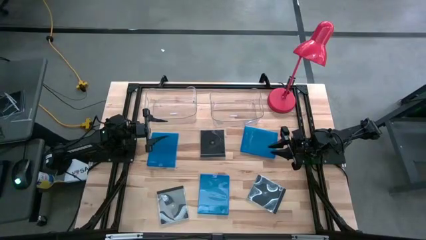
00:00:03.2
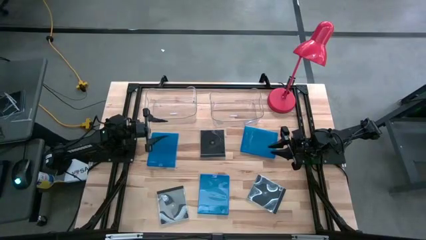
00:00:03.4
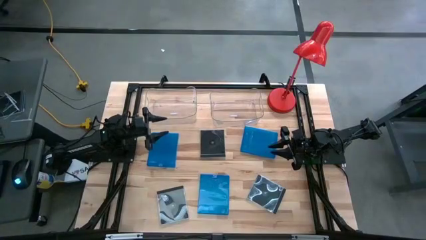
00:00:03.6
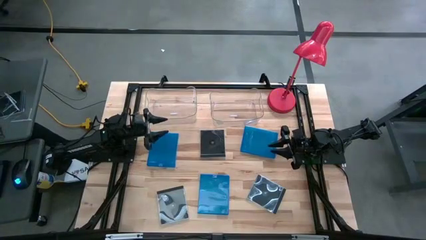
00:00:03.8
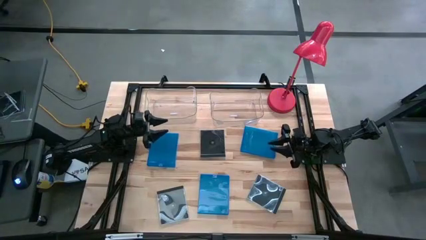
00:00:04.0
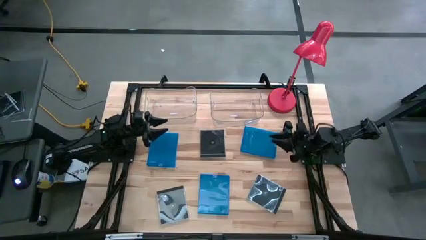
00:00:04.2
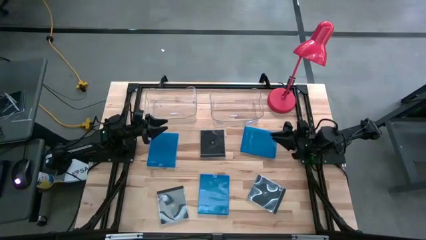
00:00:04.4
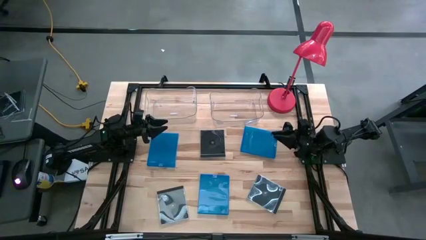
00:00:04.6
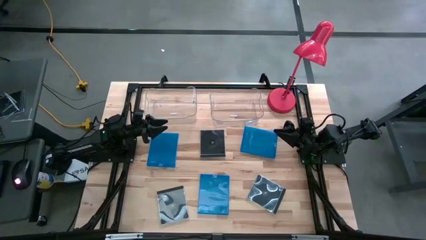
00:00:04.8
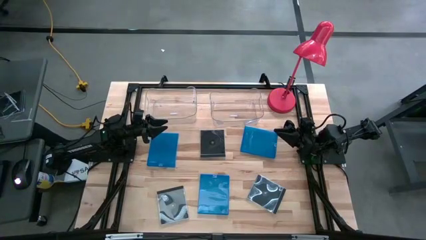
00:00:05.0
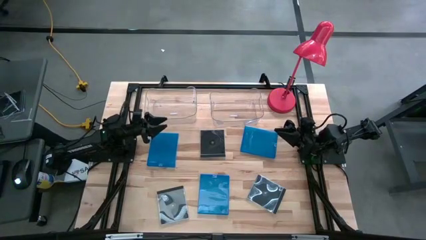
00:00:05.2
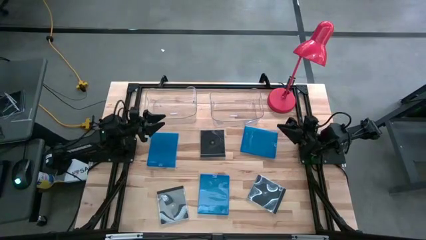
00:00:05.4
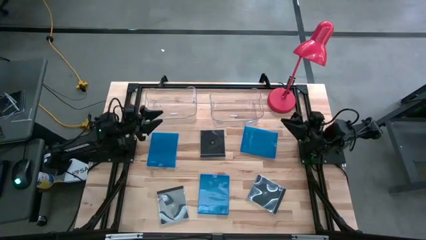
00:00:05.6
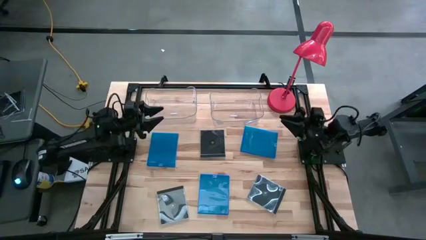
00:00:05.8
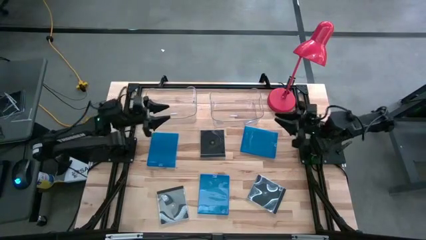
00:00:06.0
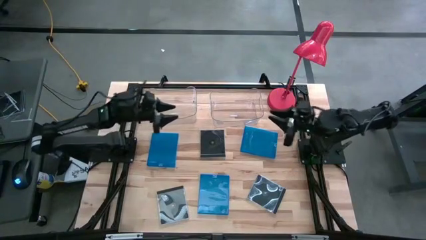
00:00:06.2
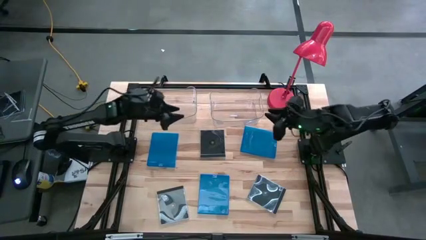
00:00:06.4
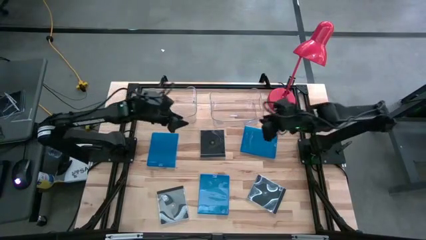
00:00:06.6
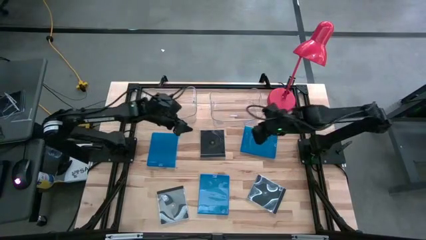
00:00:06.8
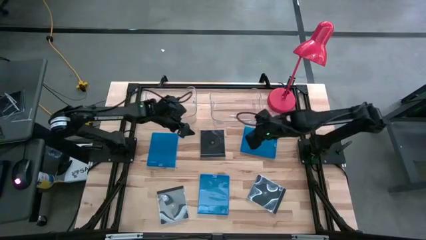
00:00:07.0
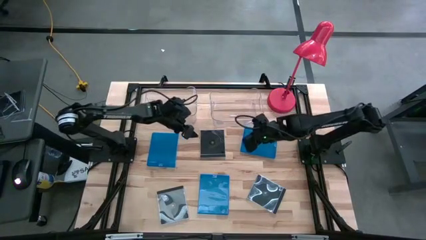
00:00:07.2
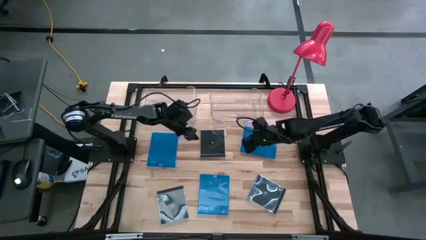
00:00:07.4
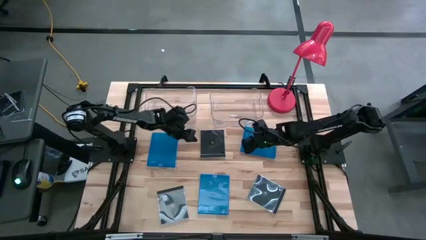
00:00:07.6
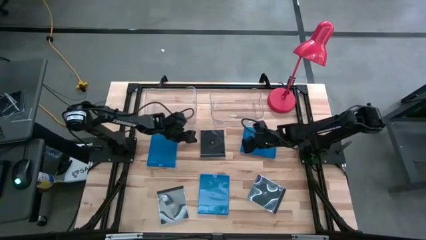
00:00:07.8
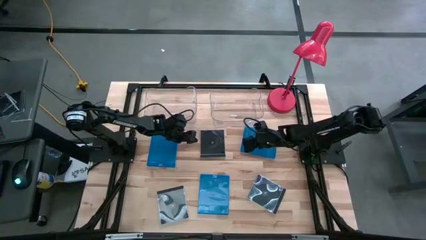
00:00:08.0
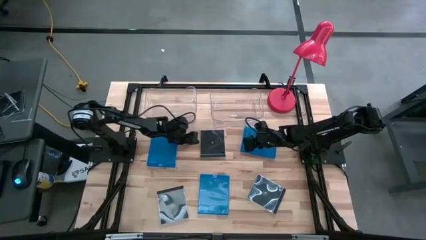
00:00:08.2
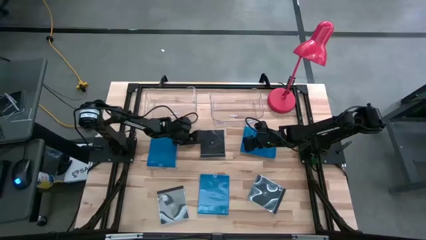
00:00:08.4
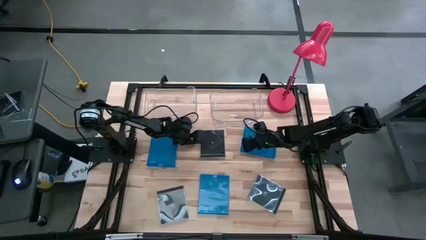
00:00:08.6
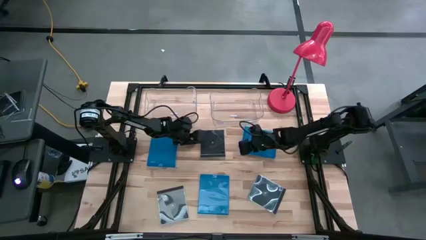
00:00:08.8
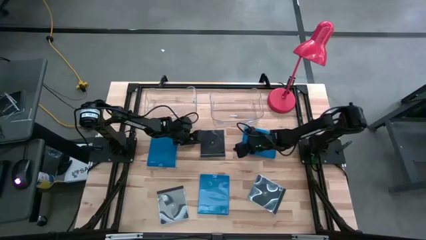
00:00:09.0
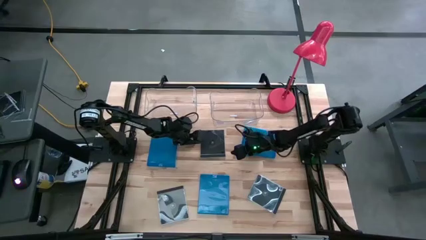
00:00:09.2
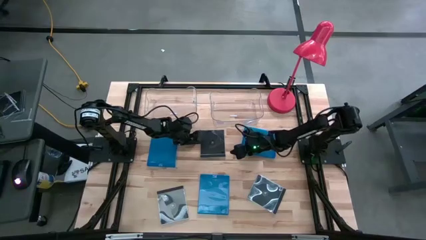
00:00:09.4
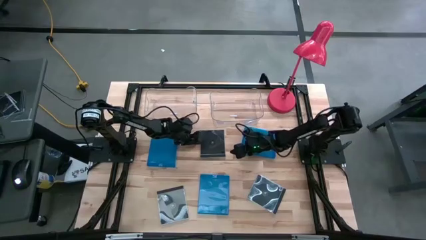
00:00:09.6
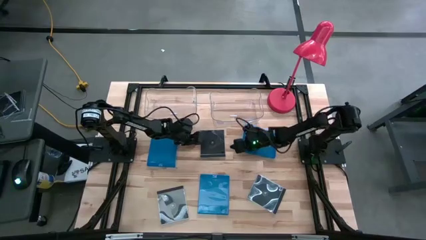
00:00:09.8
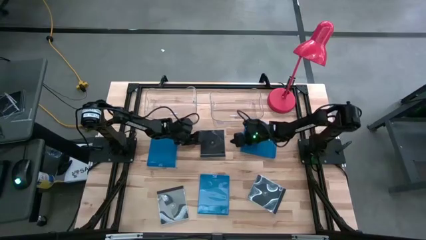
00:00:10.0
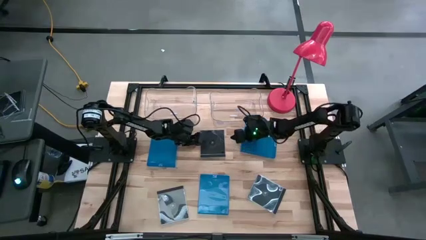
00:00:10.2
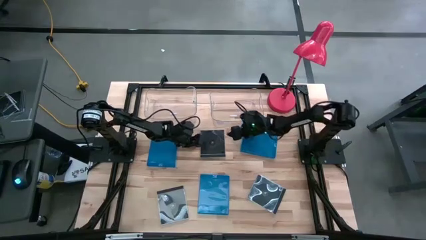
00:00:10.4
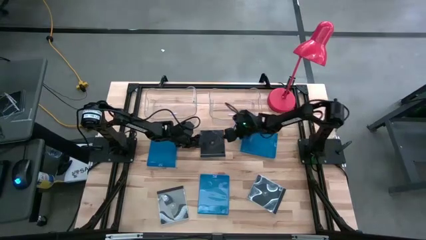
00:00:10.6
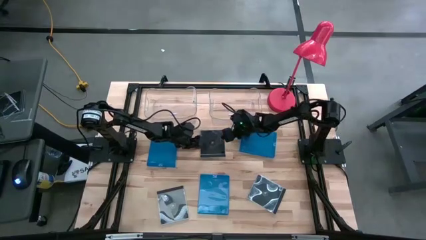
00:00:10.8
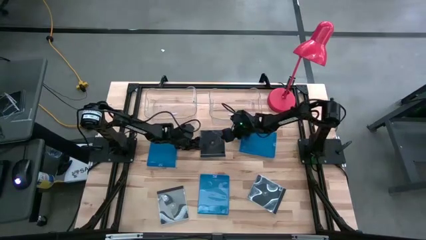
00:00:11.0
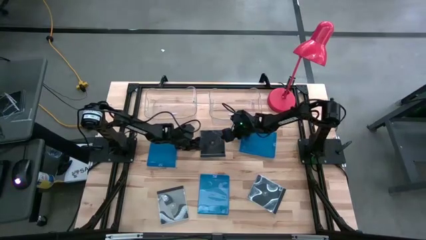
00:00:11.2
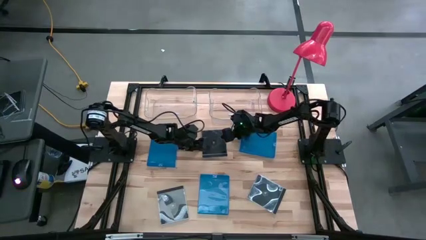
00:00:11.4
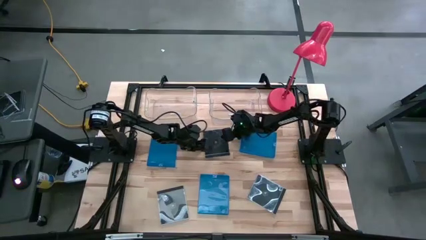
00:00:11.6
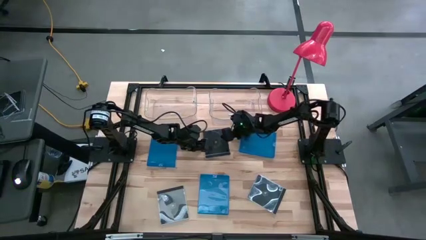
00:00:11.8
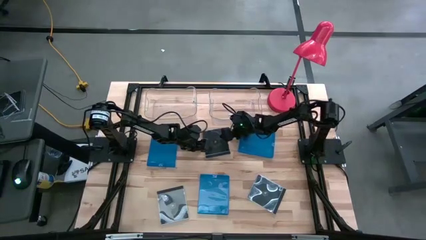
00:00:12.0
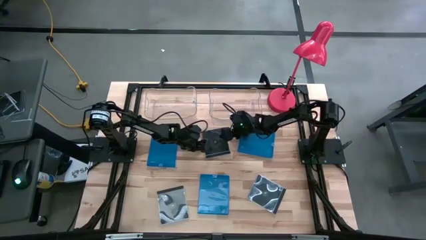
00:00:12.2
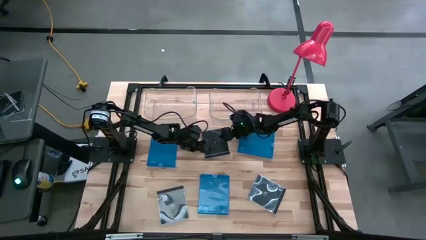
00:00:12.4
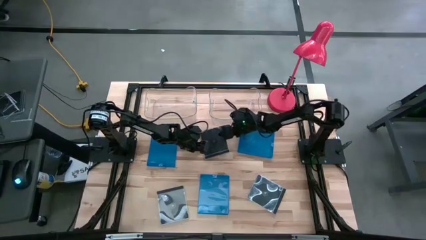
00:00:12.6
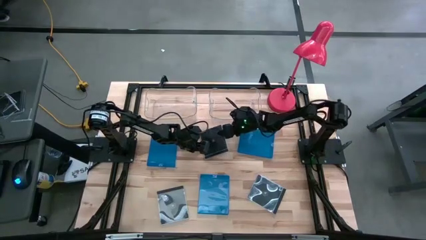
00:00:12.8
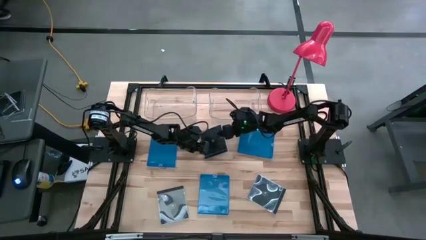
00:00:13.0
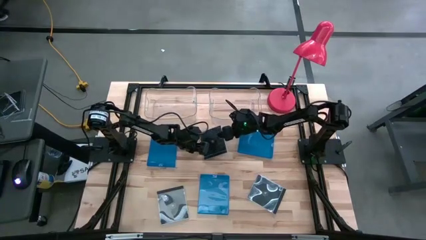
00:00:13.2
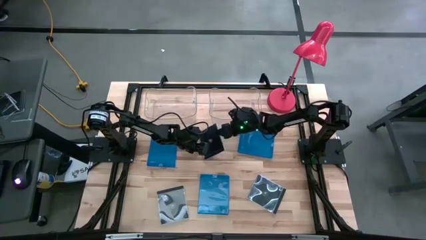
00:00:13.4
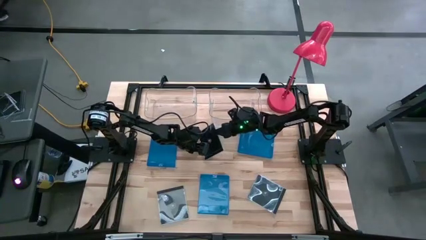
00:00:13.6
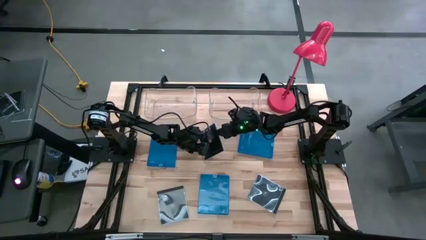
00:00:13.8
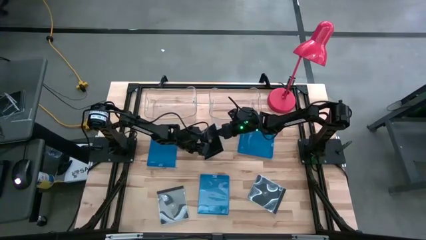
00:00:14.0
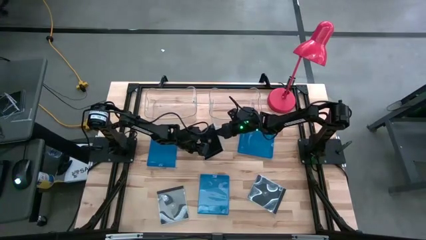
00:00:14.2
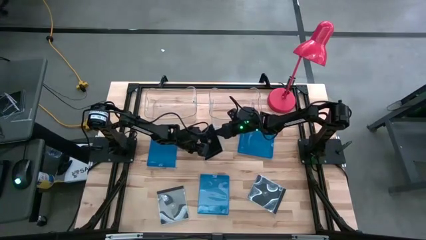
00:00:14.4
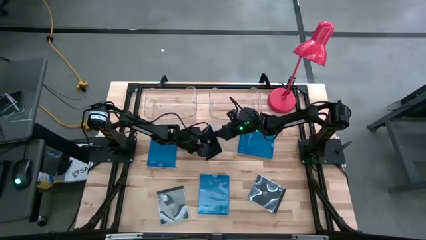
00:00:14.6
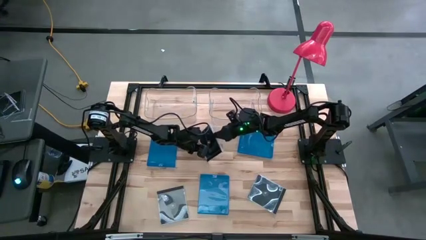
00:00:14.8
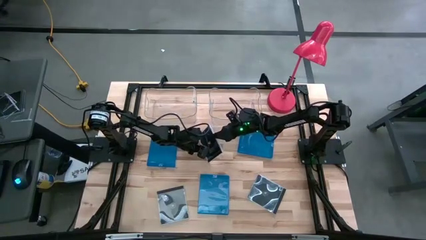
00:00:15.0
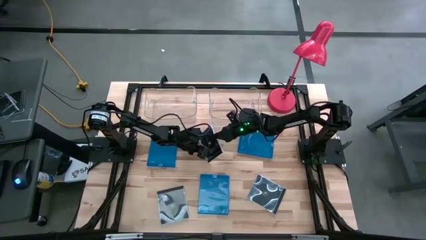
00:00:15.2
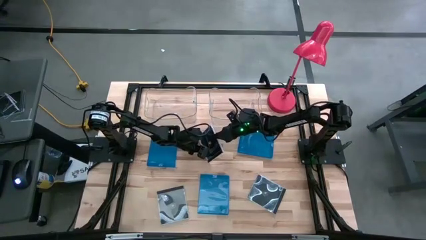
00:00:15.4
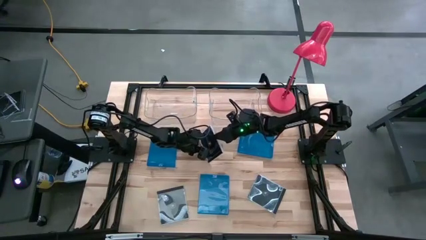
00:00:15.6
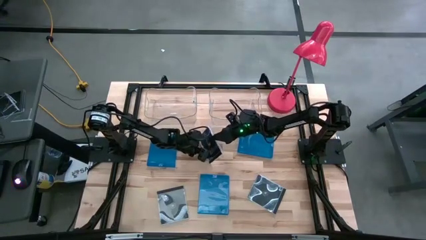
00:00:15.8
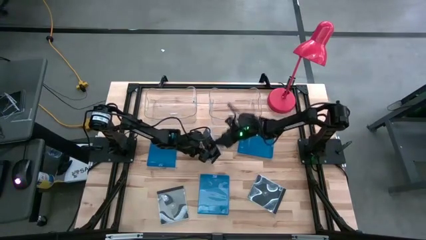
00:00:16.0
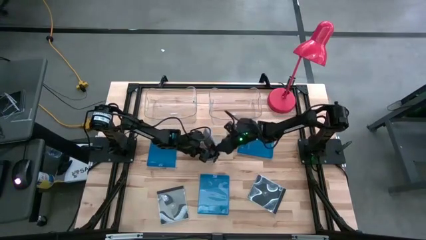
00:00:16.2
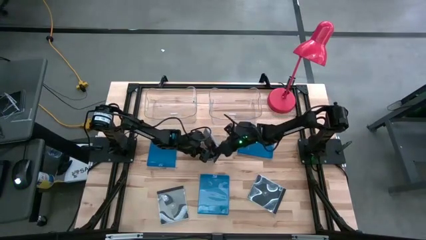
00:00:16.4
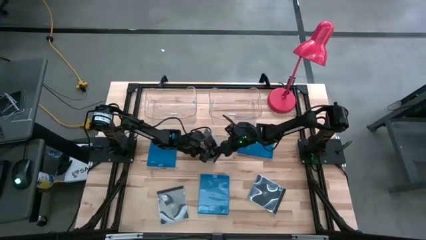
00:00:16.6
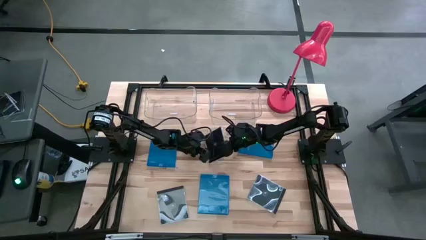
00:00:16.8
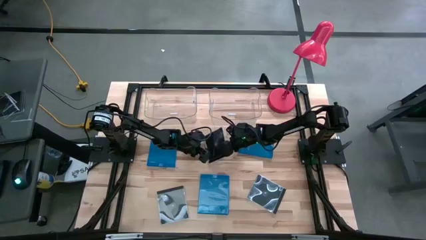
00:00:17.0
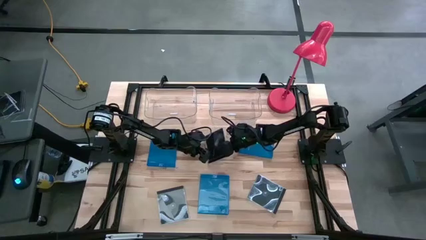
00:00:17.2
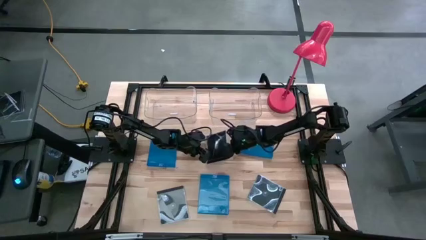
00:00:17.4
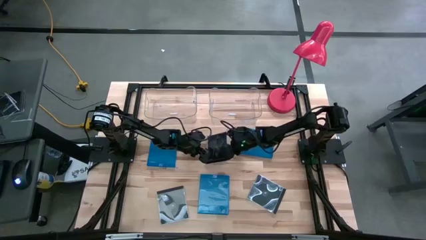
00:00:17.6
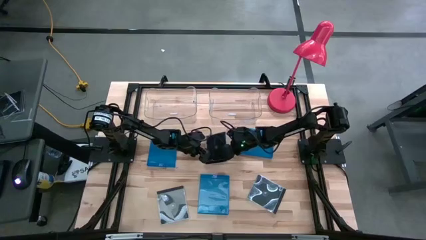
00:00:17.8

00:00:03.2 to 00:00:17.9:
Task: Pick & place jewel cases by type
Put the top black CD case into the right transparent bin

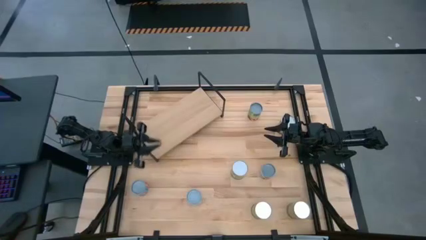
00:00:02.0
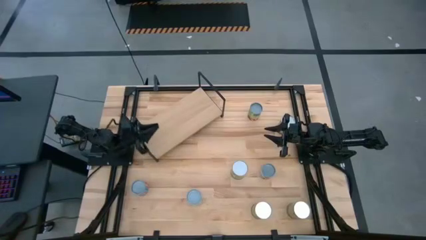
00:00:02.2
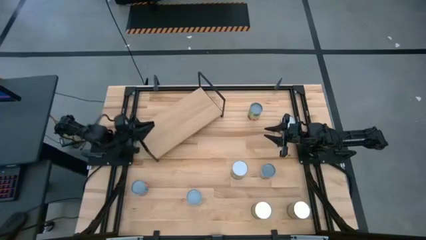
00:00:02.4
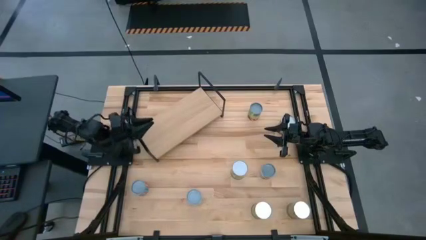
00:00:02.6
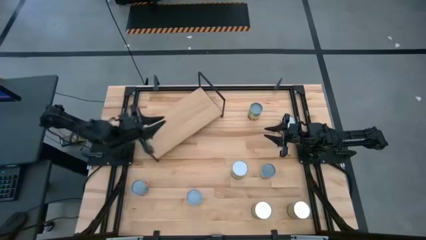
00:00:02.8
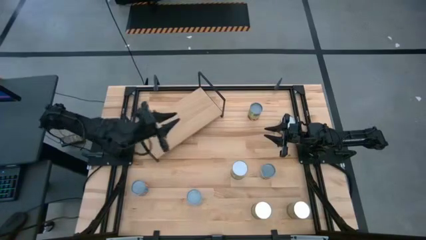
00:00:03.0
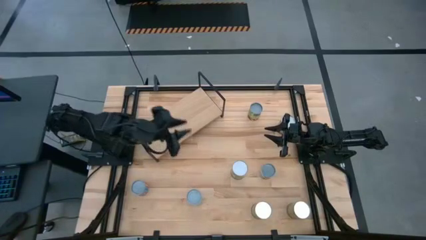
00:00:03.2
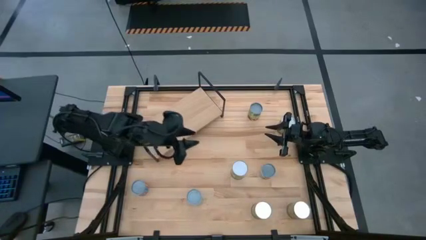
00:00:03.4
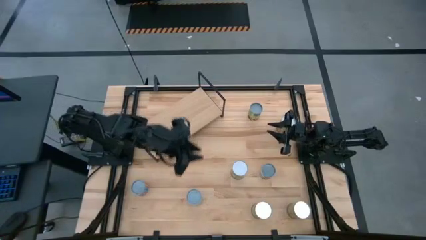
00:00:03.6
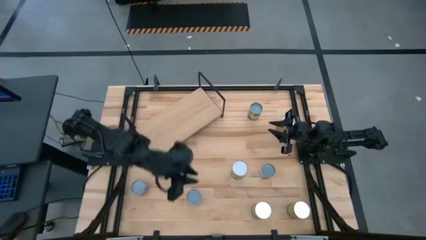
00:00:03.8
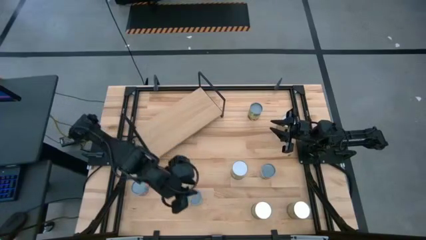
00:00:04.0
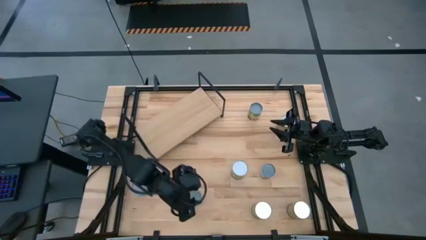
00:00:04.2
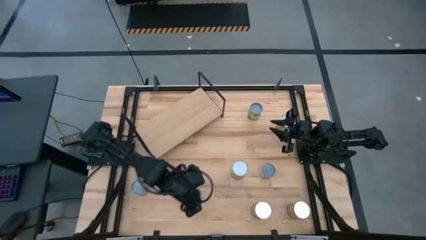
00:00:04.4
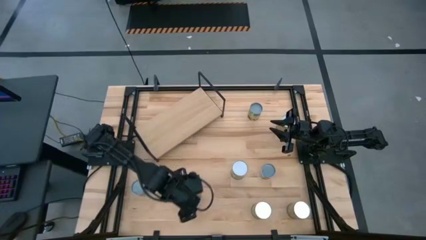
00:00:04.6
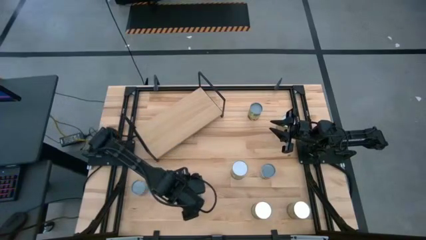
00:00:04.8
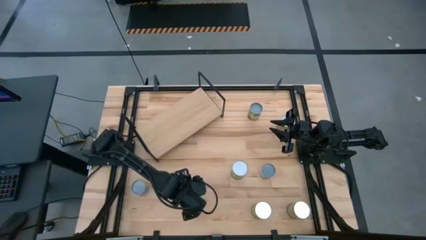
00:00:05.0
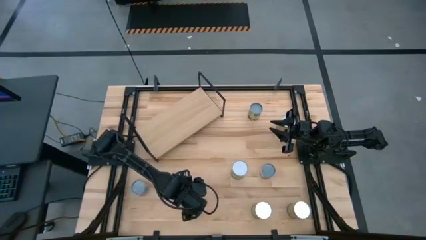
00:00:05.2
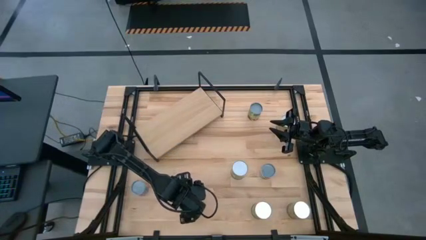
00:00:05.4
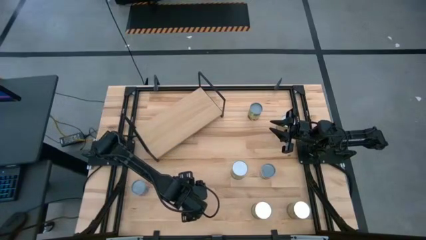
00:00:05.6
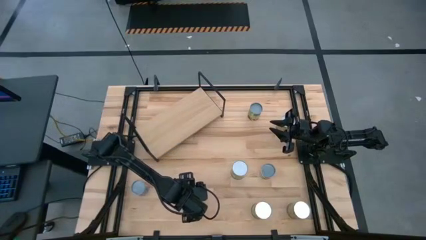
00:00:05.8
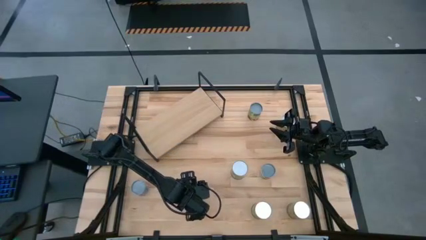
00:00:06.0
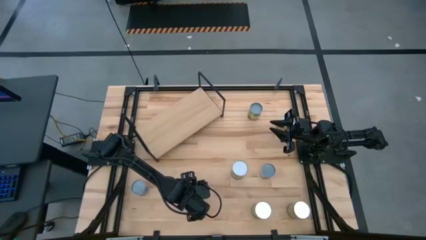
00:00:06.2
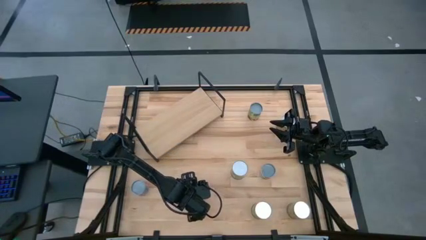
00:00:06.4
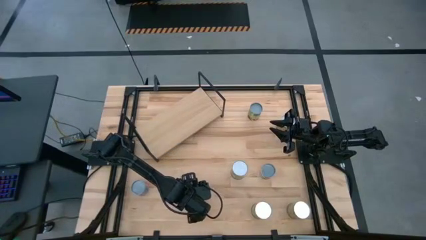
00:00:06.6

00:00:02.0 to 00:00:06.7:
Task: Pick and place cans onto a shelf
Put the canned mixed fruits on the shelf
